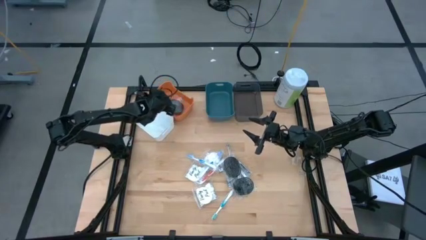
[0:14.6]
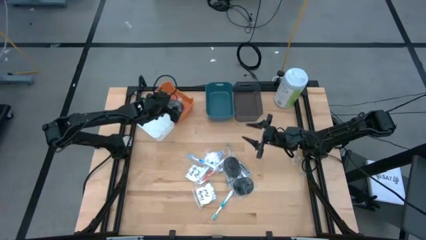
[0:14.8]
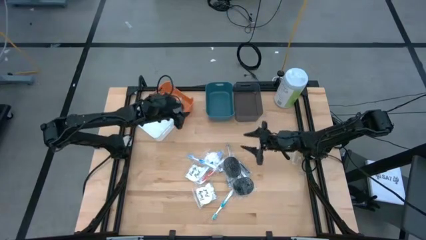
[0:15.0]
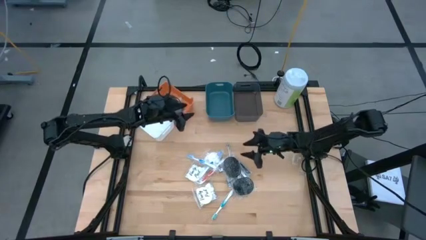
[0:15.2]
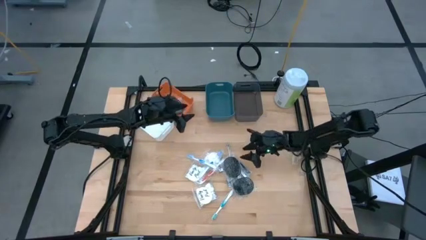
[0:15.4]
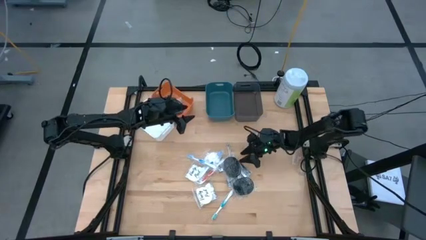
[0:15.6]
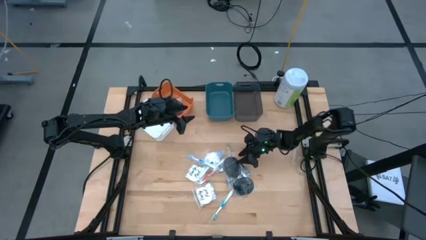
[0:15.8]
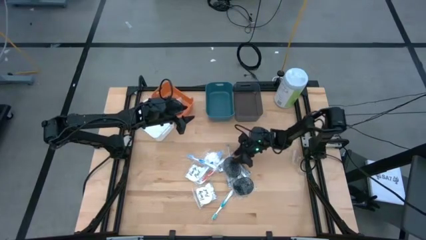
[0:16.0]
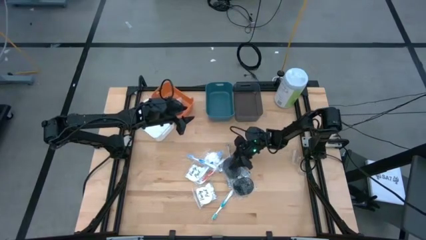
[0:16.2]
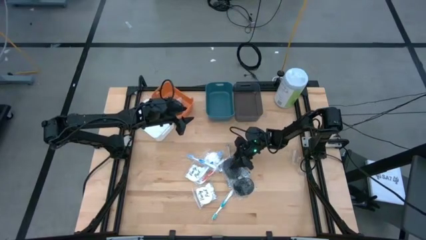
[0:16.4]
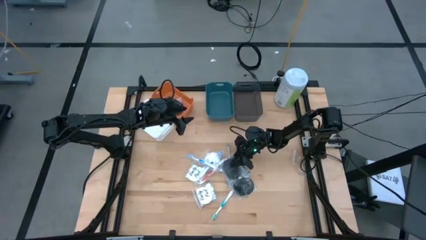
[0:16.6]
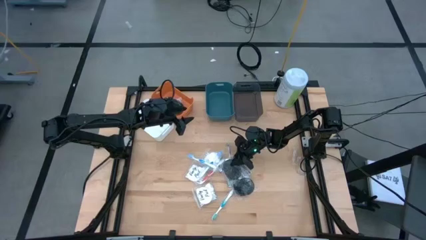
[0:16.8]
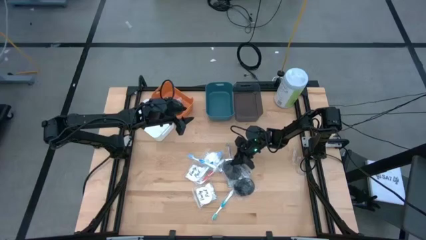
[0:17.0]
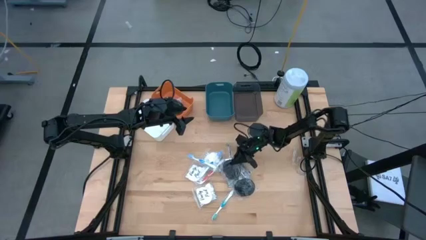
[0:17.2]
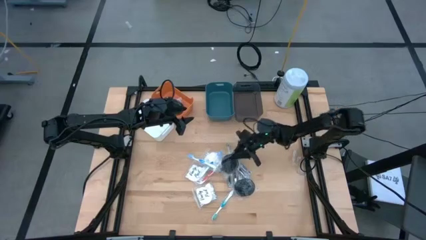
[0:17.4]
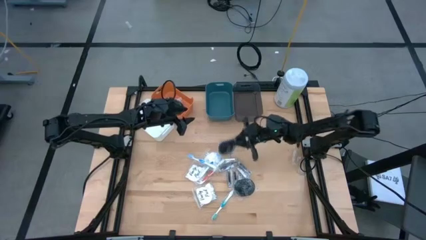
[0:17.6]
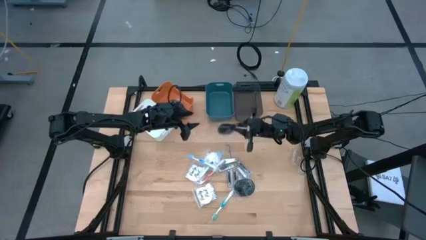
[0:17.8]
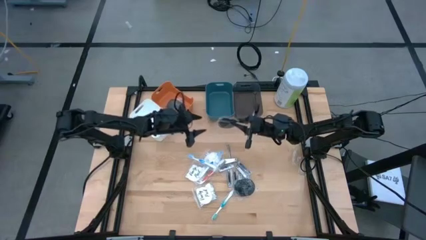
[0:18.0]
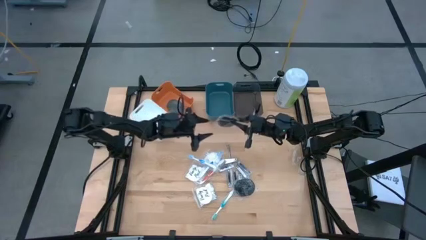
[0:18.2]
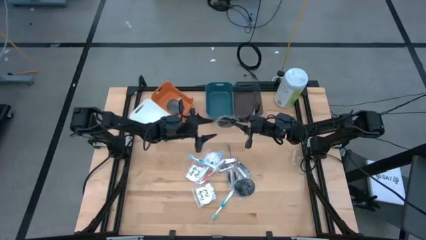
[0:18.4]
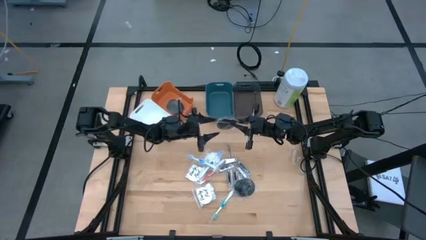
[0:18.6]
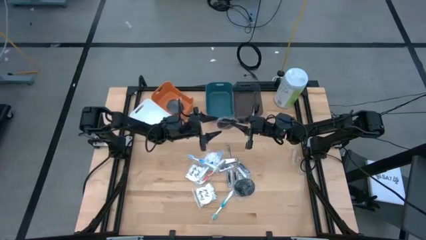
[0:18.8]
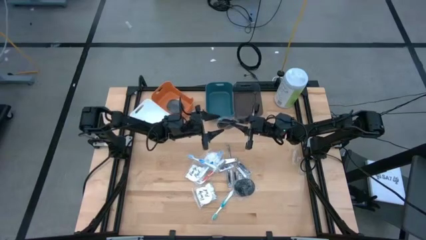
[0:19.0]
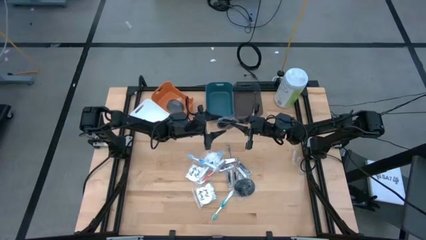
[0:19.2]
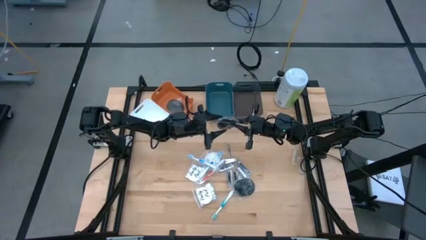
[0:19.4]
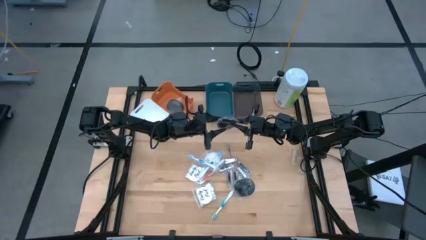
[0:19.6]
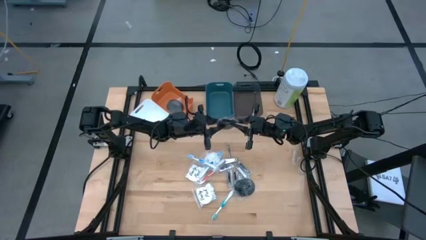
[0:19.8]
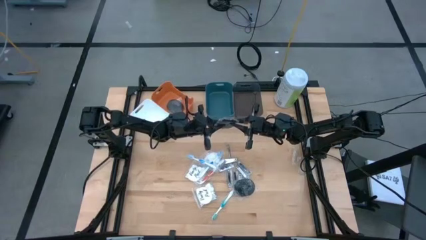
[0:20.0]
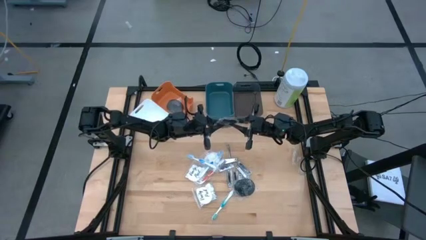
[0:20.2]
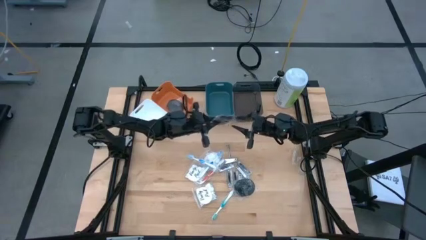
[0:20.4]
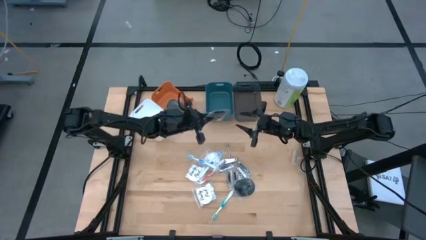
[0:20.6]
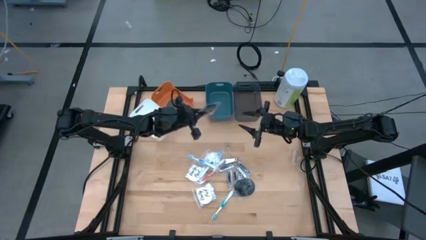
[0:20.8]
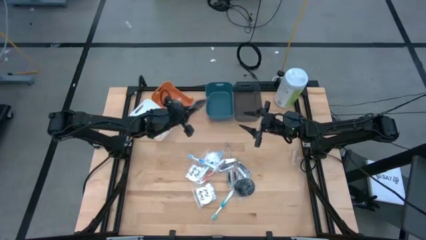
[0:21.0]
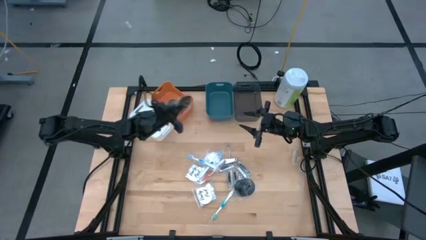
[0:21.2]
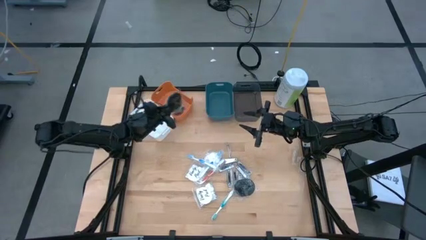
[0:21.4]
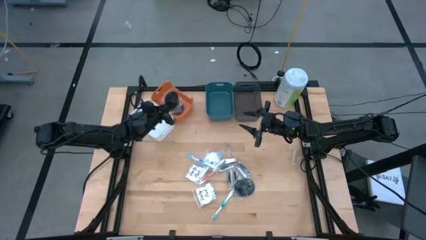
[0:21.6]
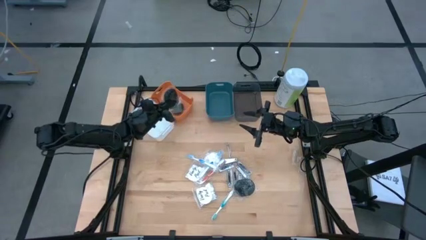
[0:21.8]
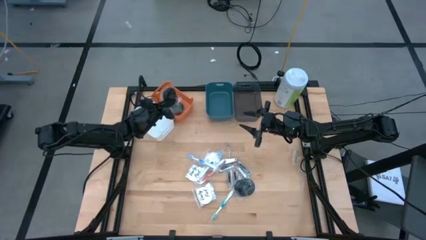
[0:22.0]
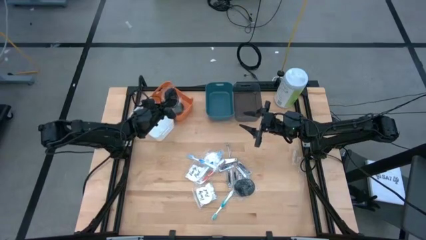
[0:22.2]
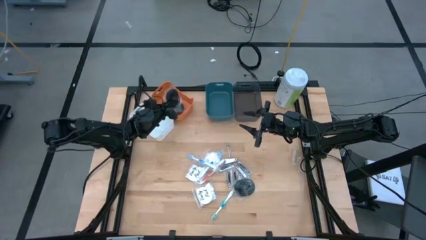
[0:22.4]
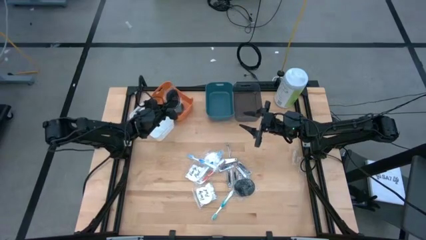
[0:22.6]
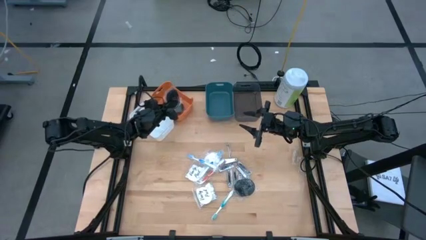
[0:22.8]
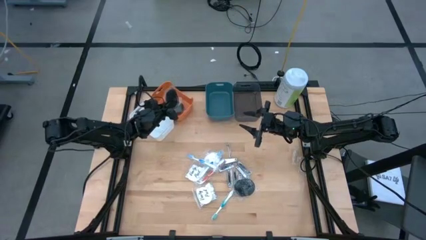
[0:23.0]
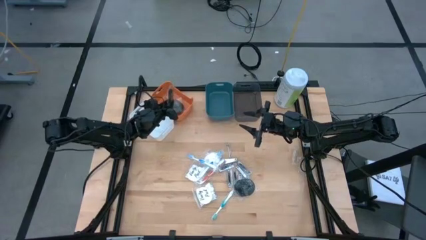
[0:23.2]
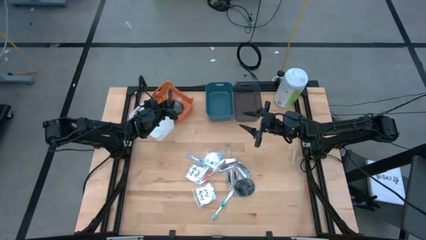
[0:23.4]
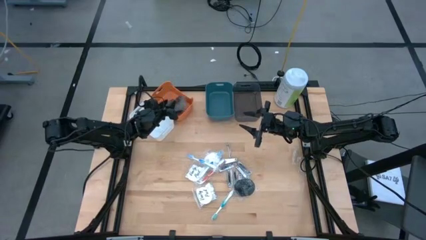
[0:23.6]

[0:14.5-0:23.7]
Task: Pick & Place Travel size toiletries
Put the top black hairbrush into the orange bin

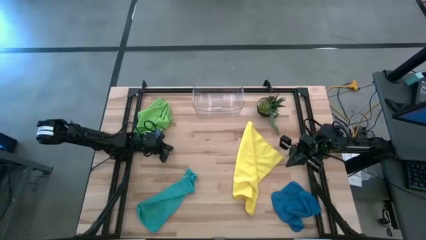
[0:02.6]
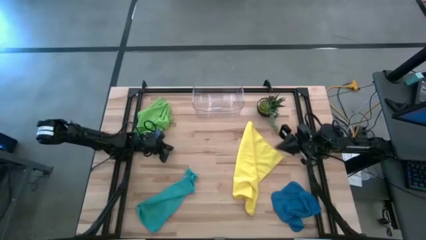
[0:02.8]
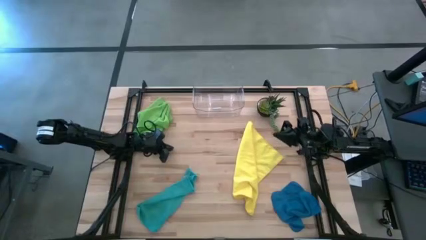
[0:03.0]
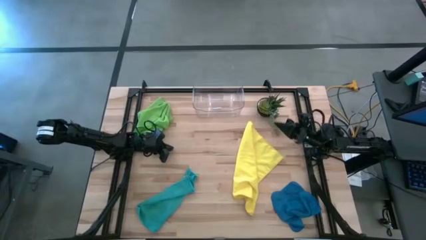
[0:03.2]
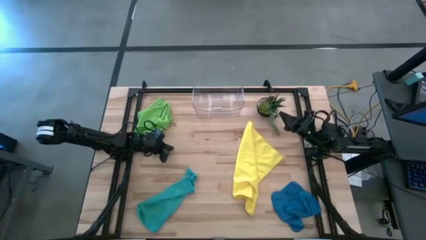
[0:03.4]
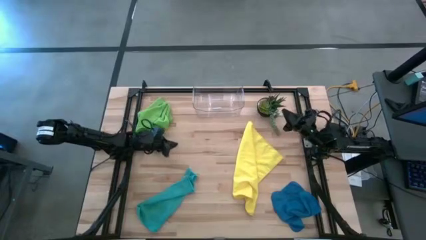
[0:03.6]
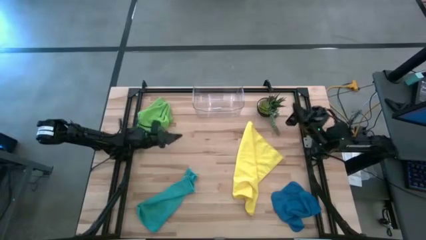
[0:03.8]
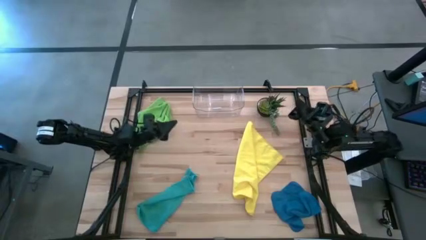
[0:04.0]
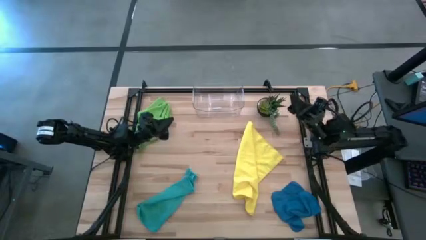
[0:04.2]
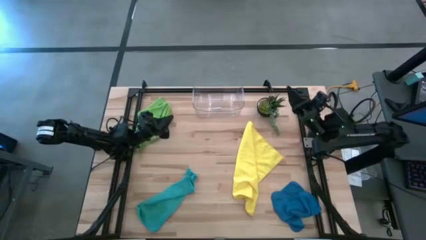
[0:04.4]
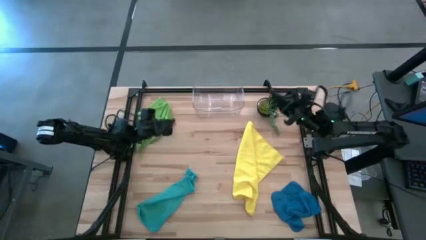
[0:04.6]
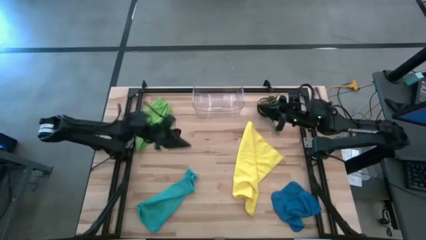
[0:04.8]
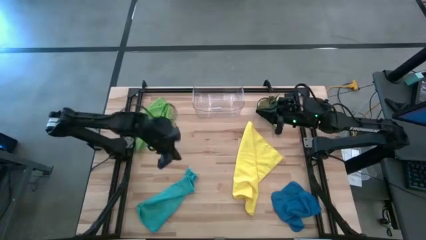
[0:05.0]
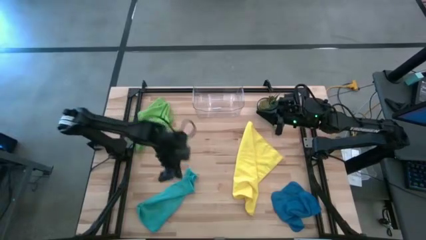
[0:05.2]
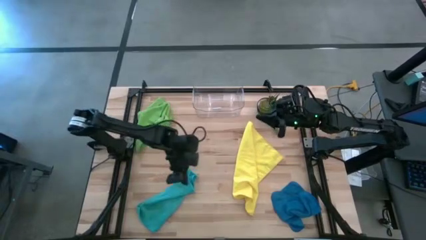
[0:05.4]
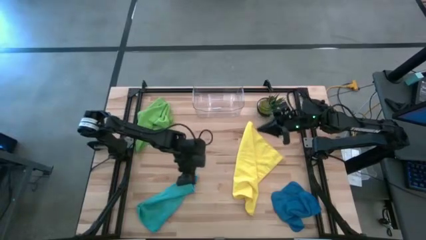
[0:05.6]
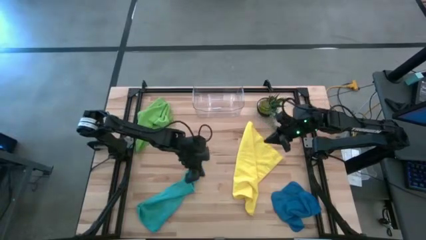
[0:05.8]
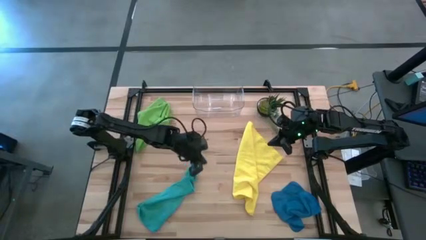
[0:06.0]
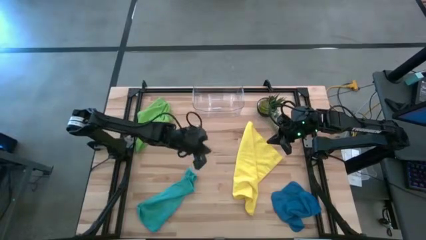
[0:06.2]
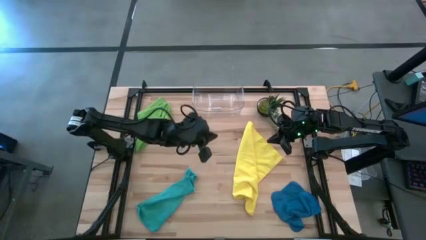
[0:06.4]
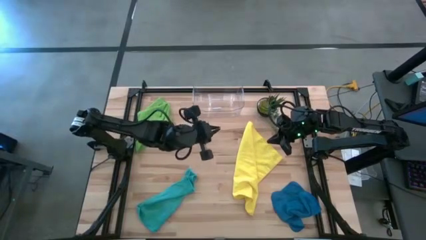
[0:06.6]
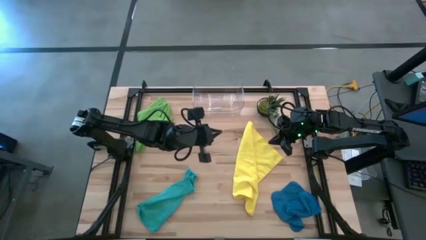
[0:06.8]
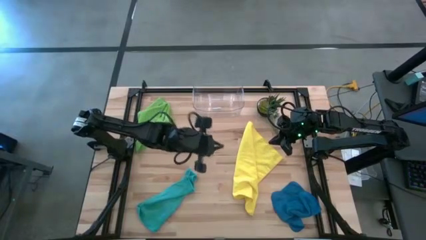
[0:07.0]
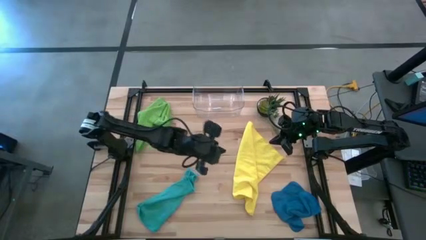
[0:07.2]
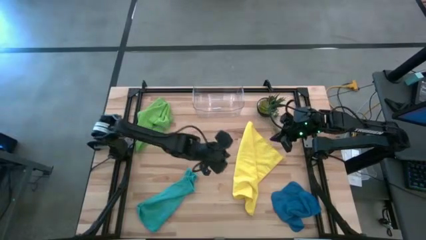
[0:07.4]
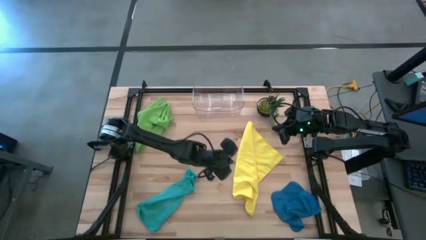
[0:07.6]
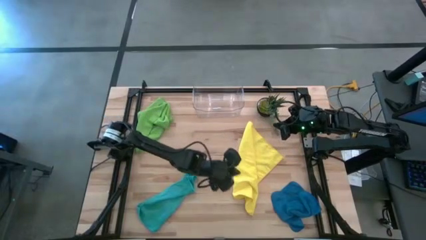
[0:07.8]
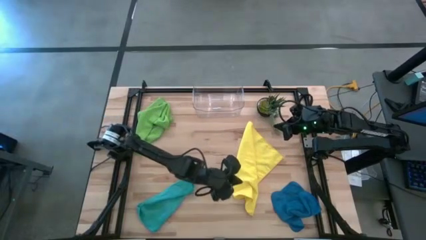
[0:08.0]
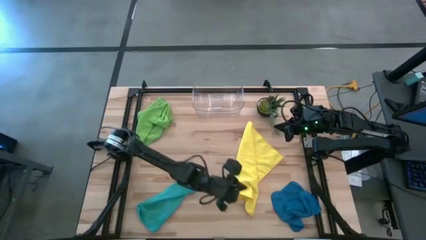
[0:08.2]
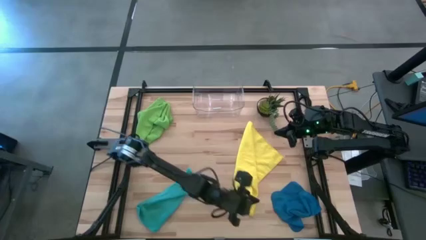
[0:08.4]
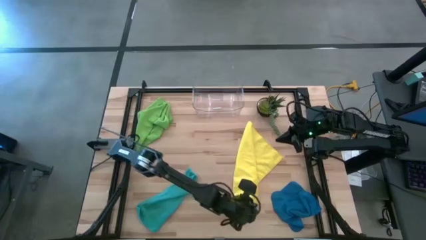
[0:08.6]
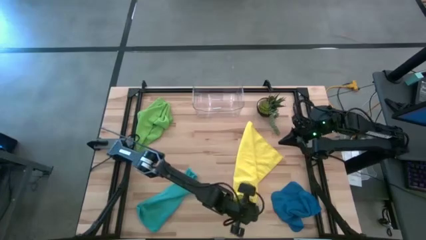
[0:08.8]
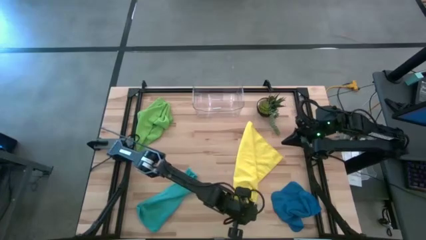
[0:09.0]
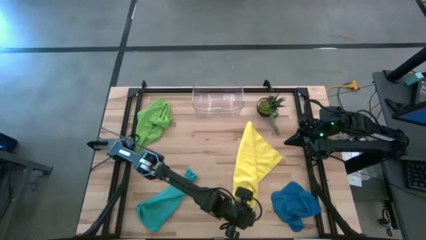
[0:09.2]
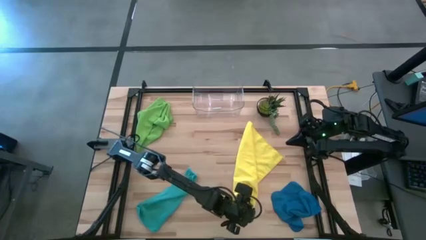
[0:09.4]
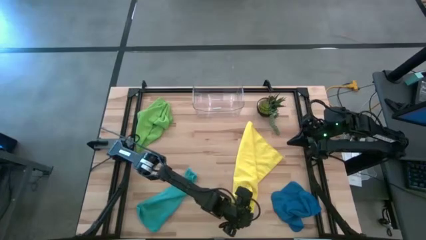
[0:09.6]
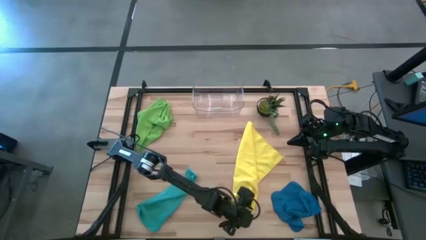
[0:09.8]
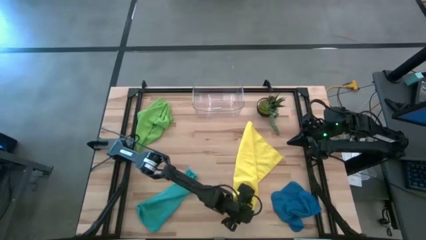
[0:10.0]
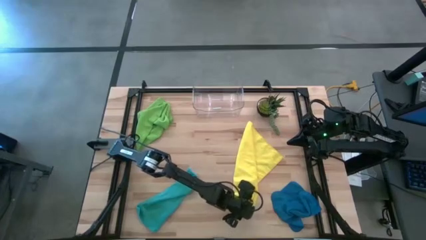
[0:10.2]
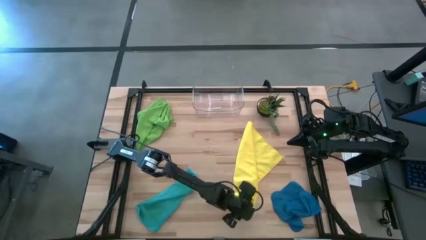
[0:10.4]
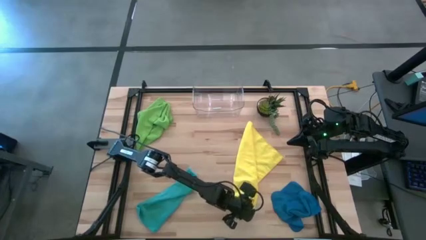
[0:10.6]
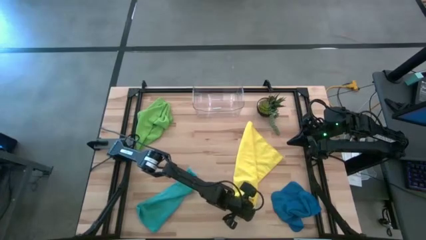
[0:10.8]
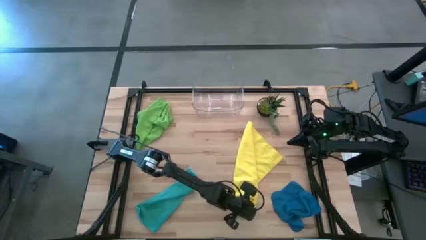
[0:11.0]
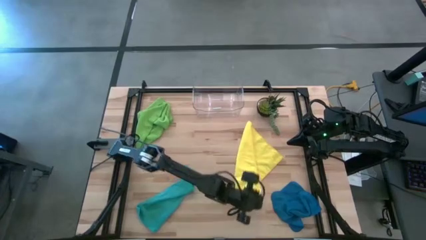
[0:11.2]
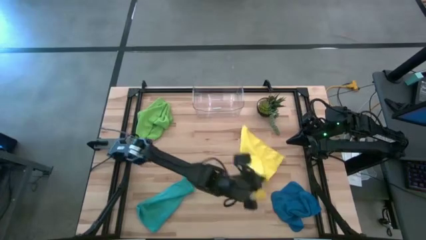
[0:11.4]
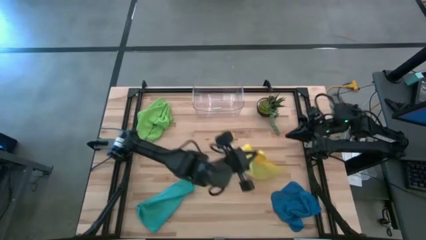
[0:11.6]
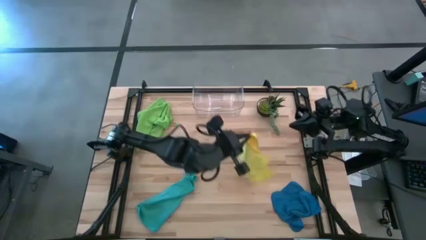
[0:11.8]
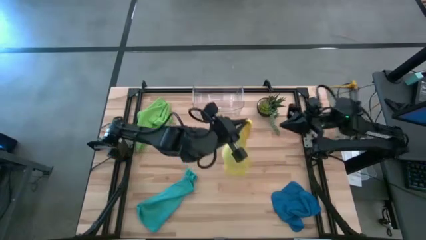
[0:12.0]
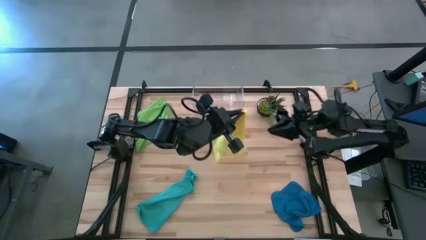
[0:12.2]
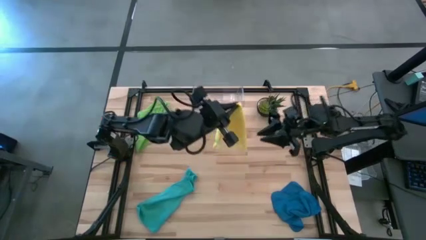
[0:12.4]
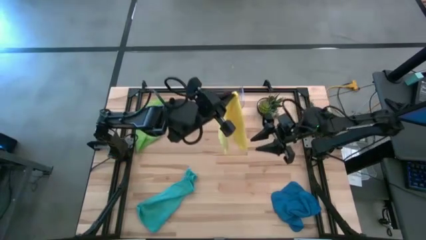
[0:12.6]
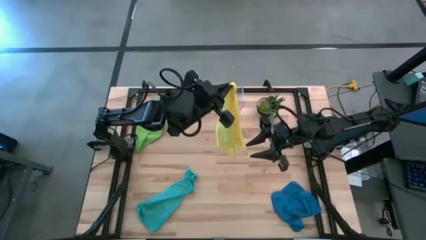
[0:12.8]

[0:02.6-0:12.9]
Task: Fold microfiber towels
Prepare the yellow microfiber towel
